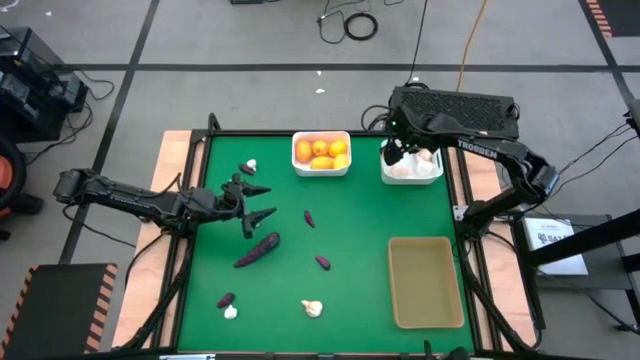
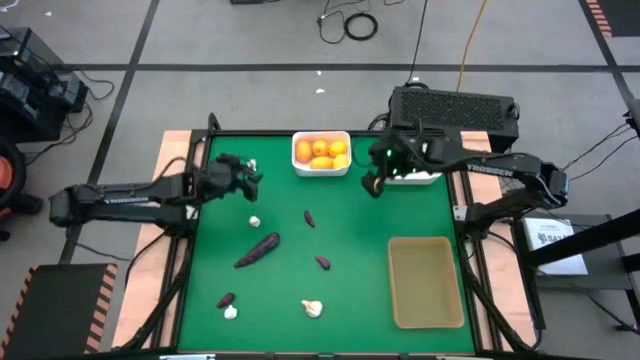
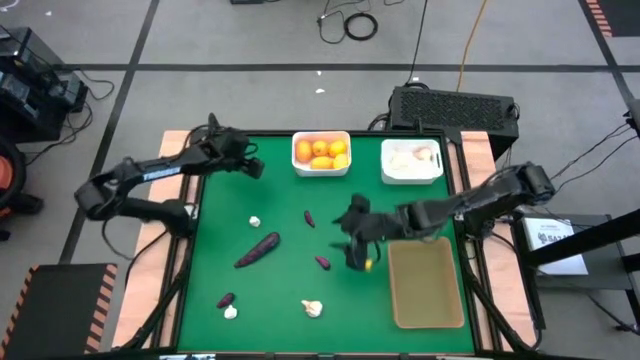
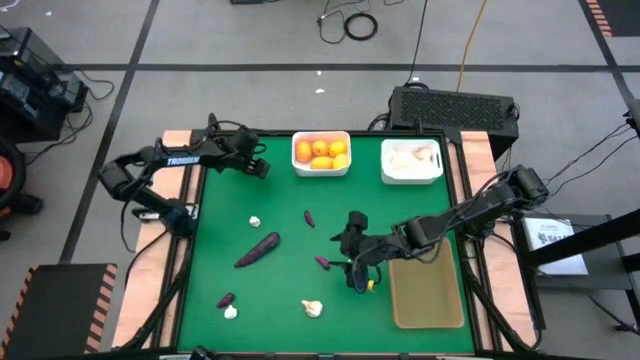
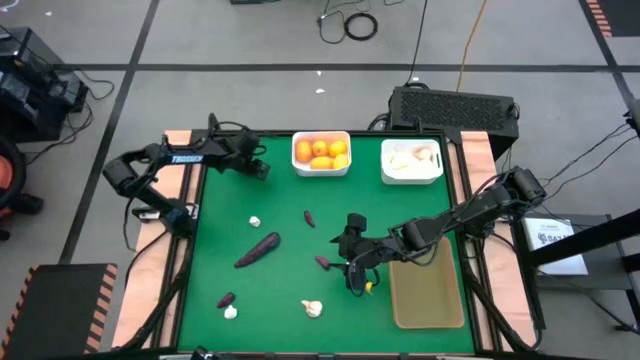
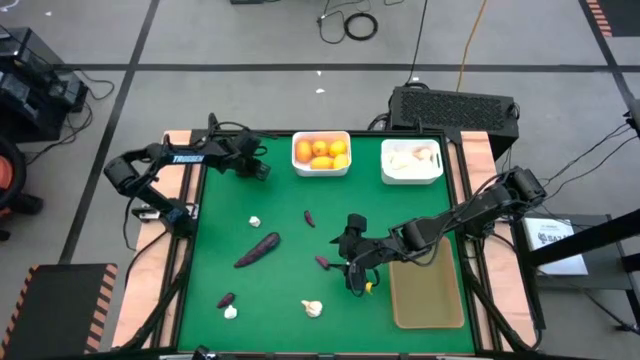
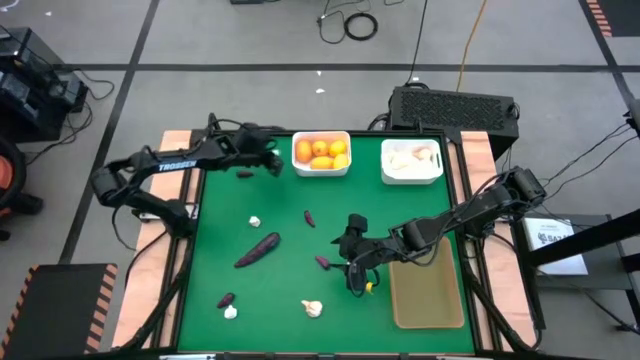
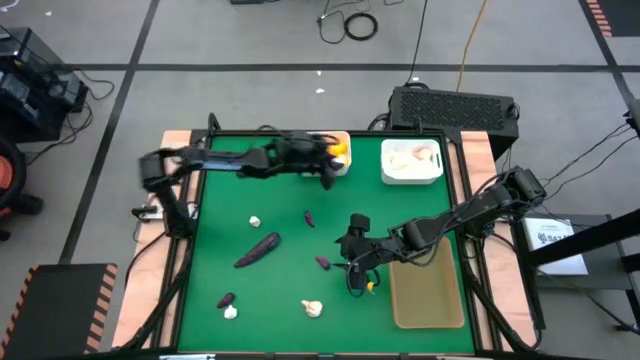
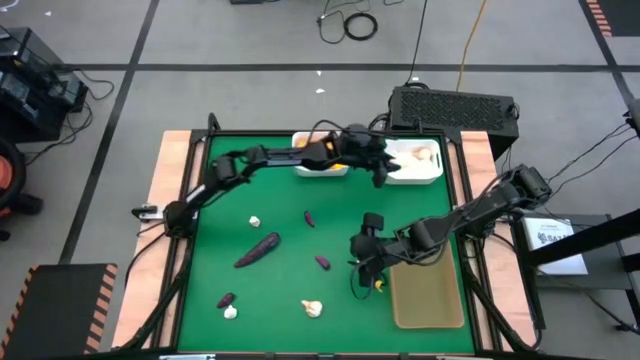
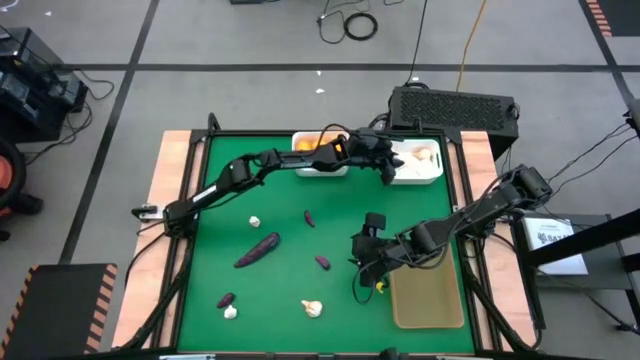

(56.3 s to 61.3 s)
Task: Sort produce into baskets
Put the garlic into the right white bin

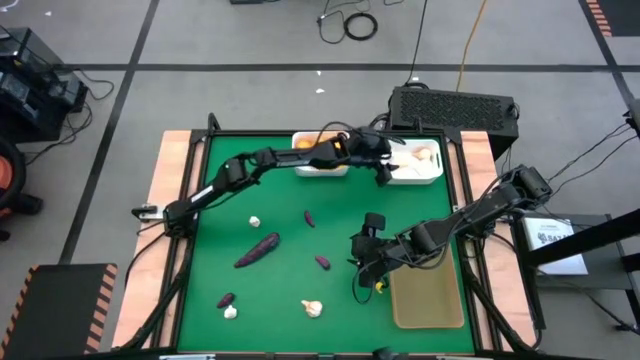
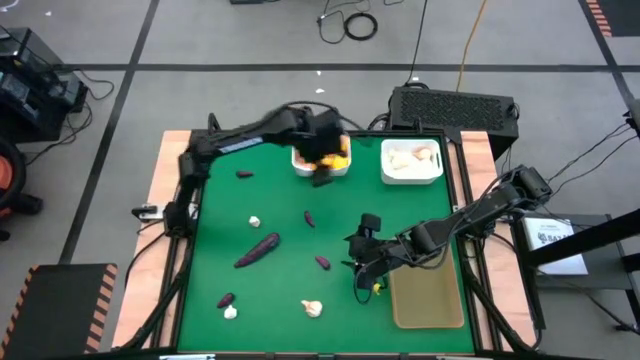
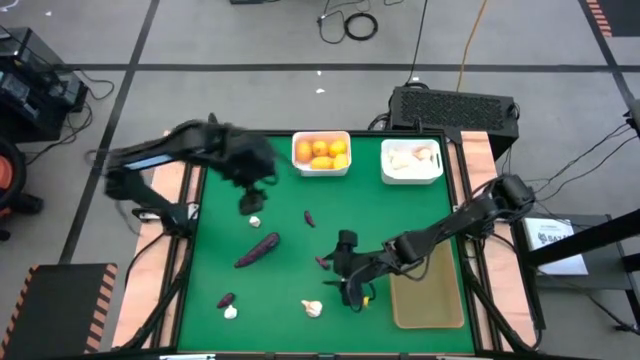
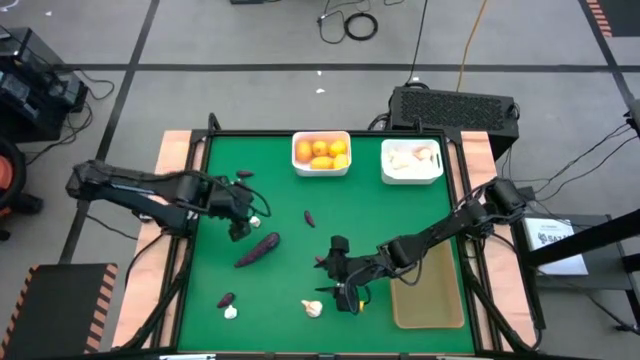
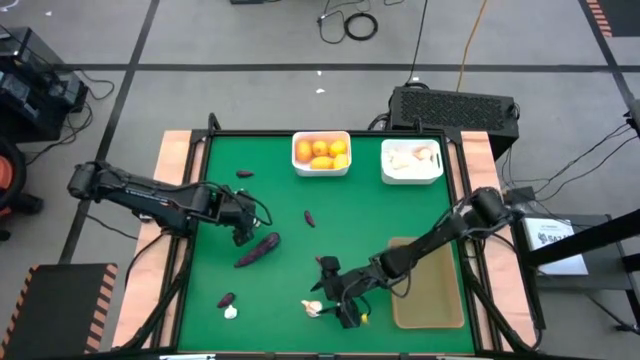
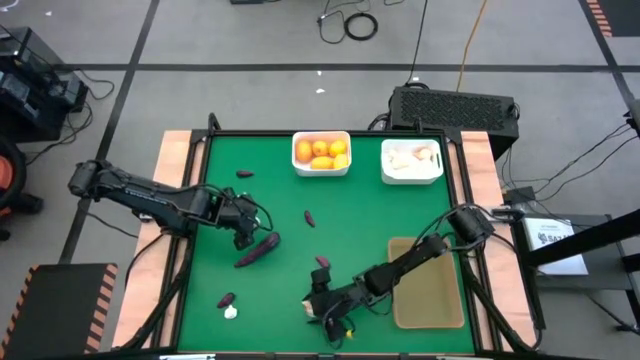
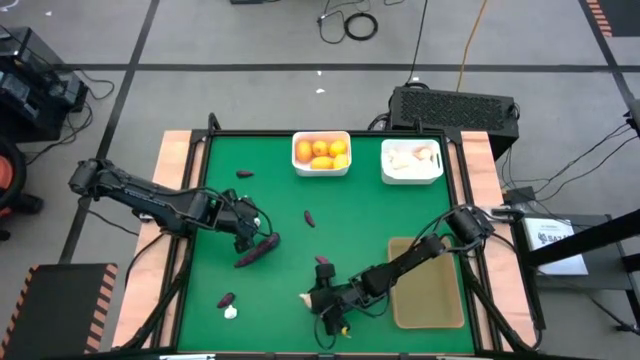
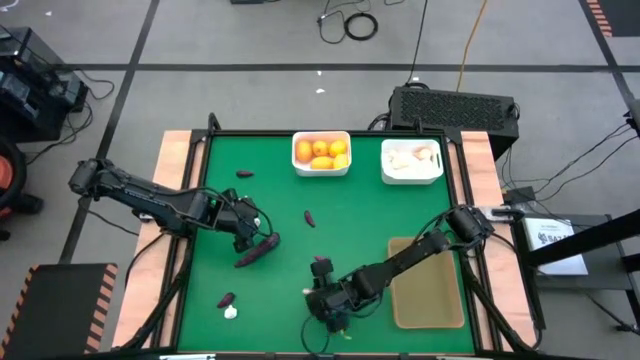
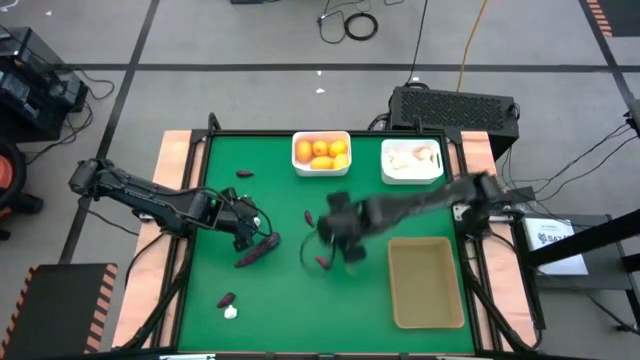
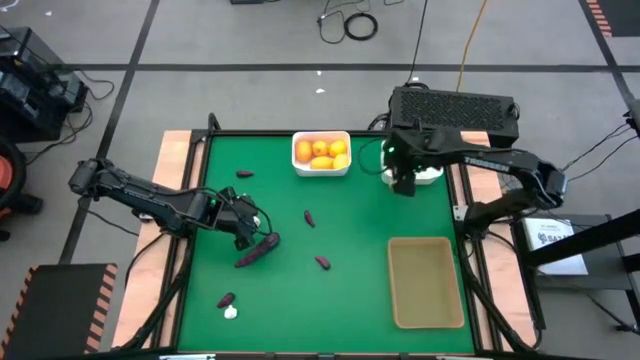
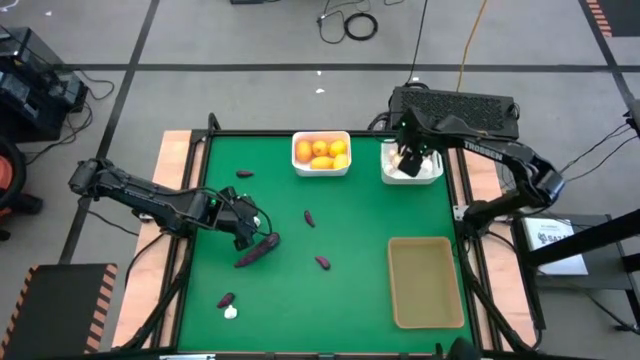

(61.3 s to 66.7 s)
Put the garlic into the right white bin

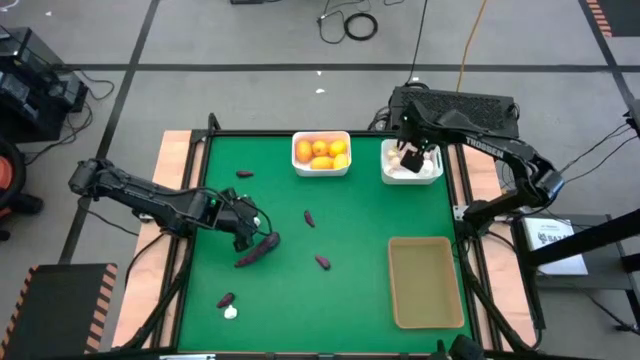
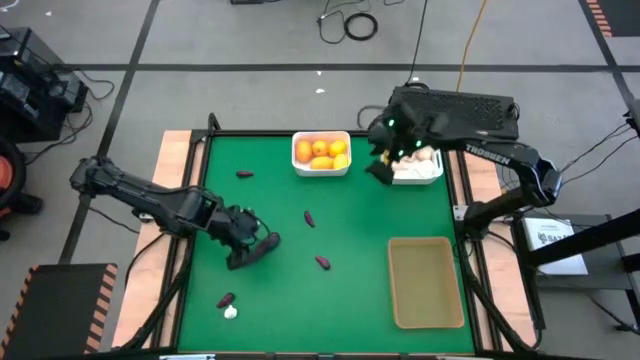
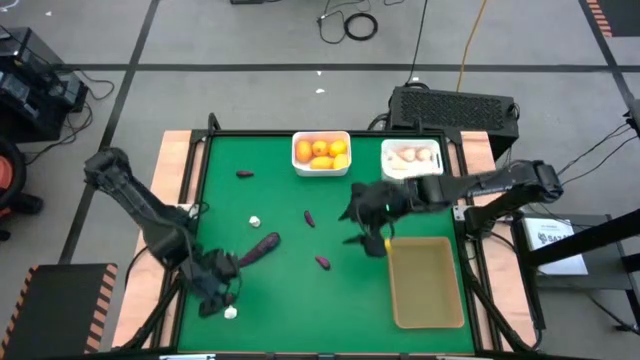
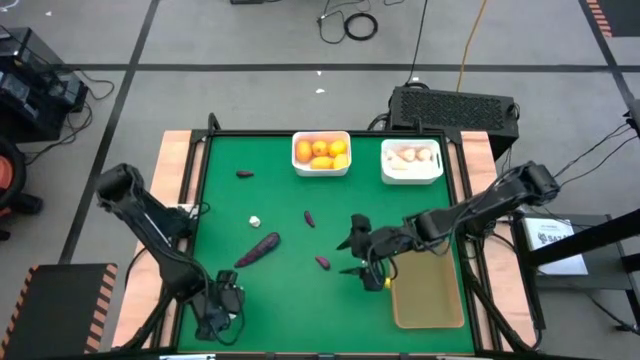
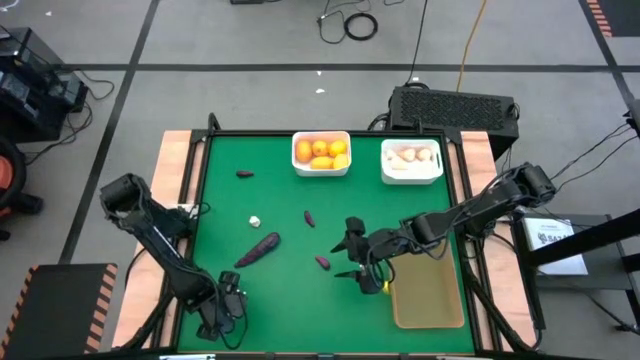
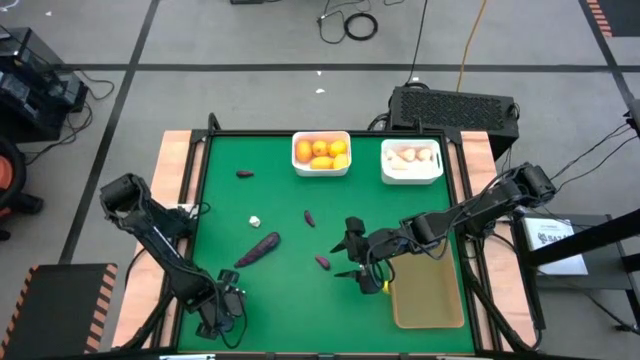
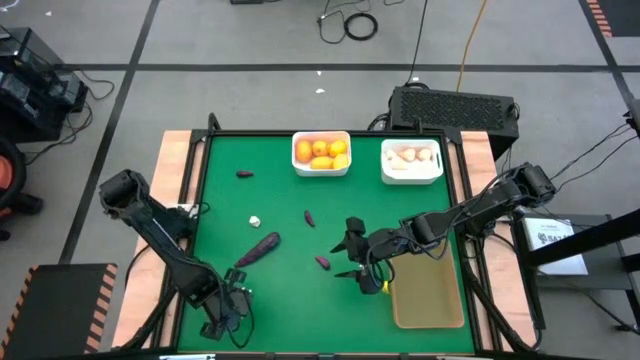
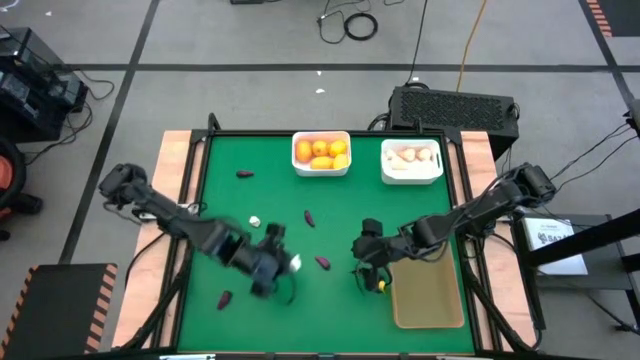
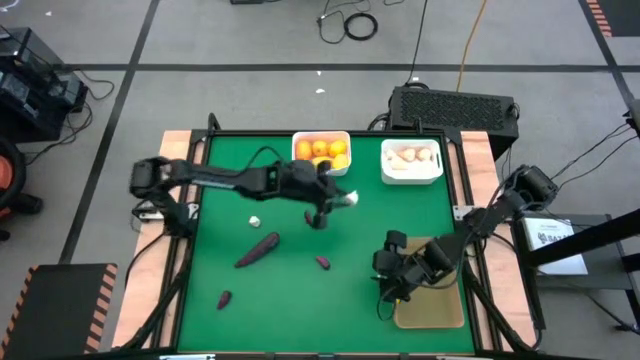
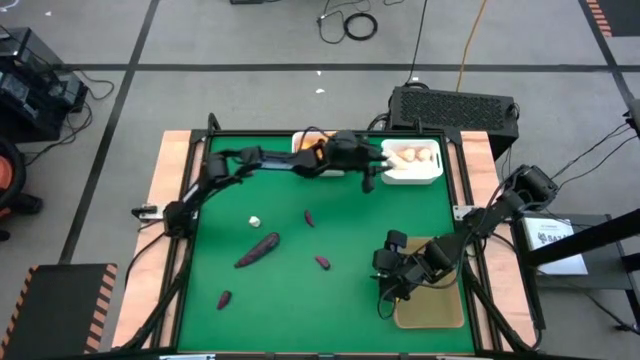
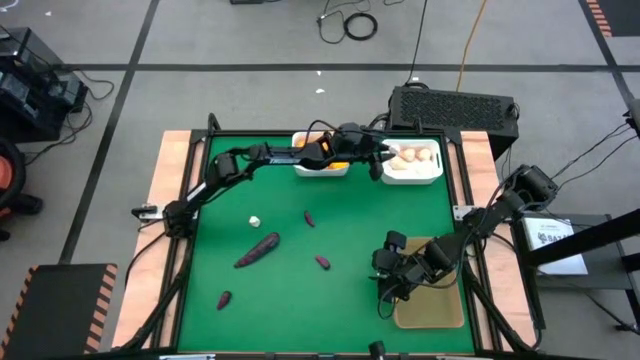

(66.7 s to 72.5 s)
Put the garlic into the right white bin

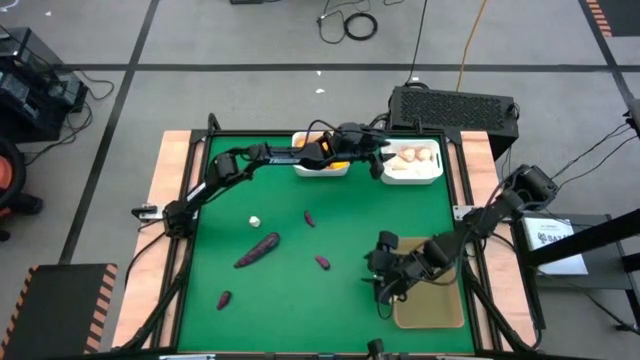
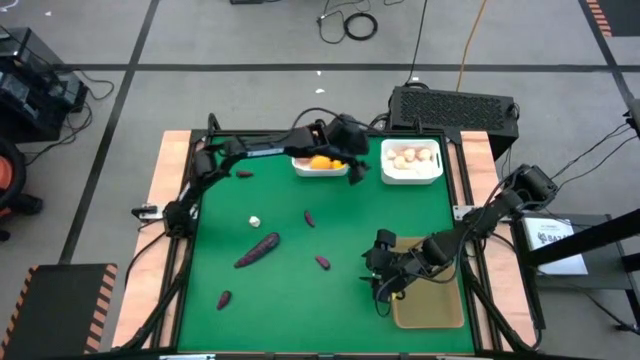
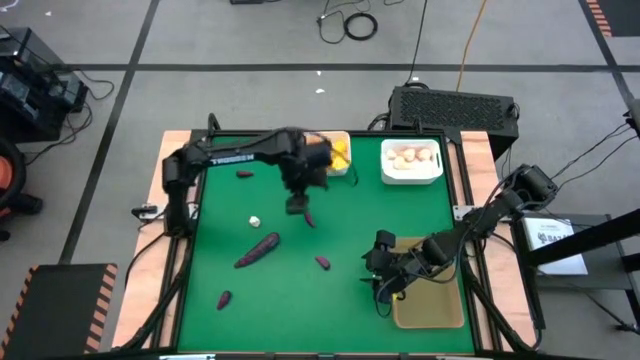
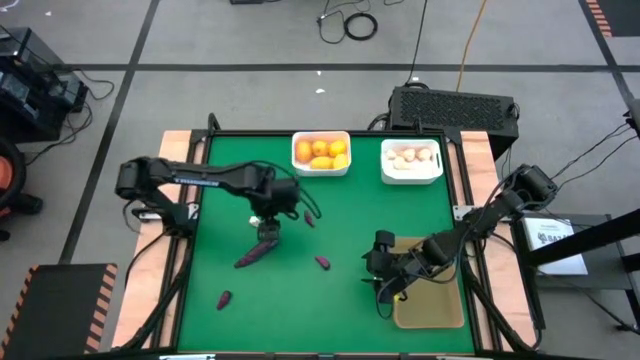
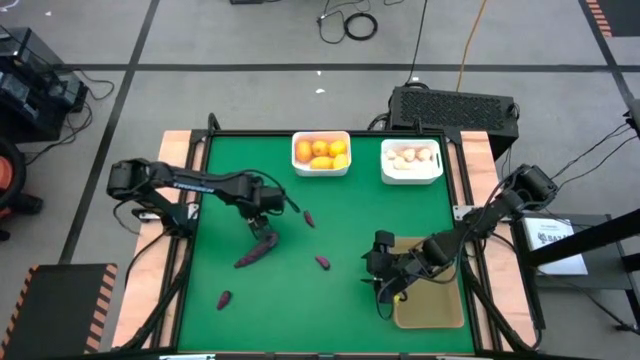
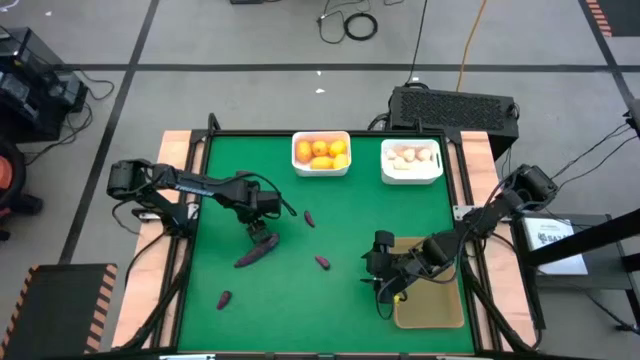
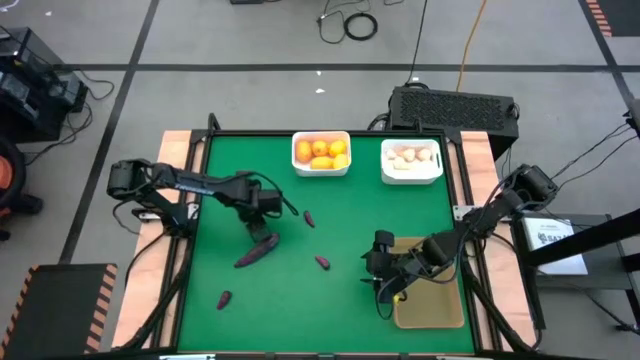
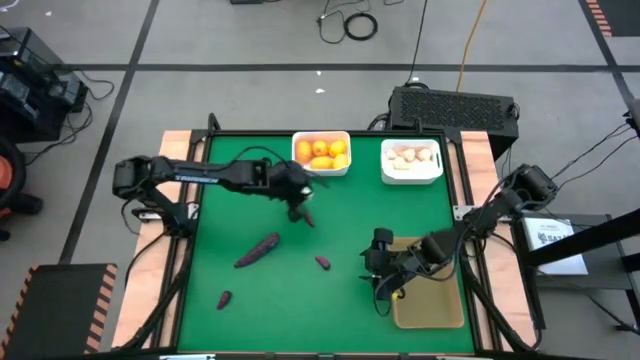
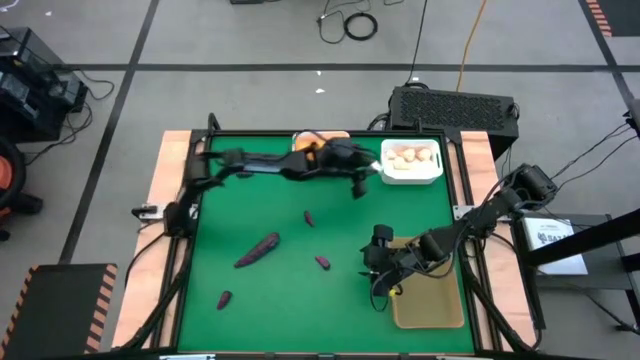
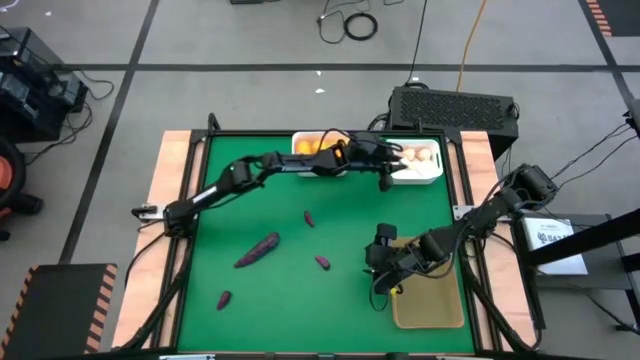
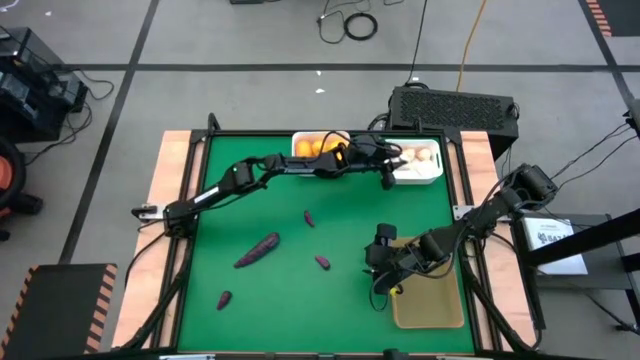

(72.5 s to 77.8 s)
Put the garlic into the right white bin
